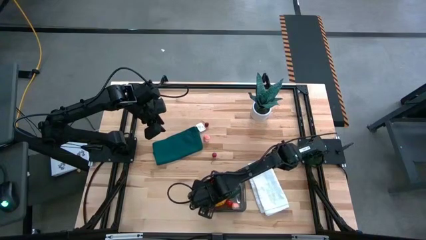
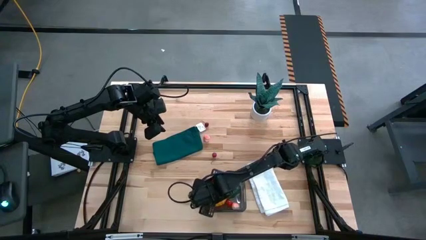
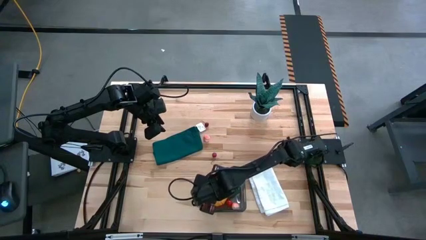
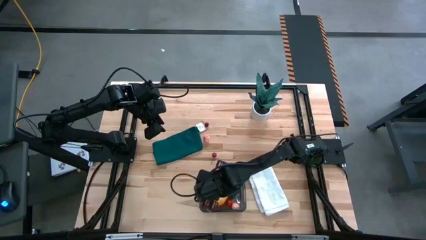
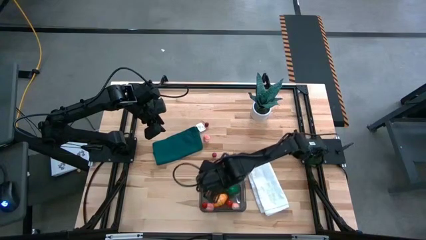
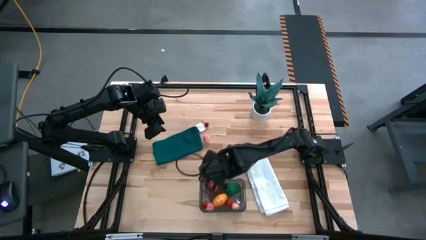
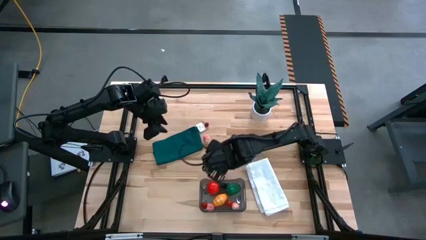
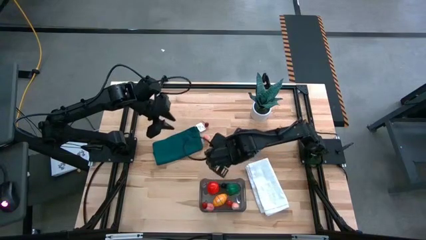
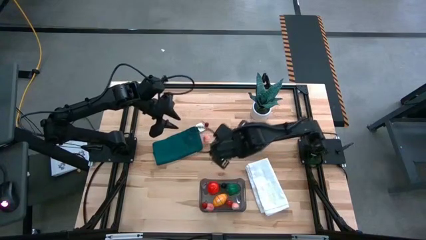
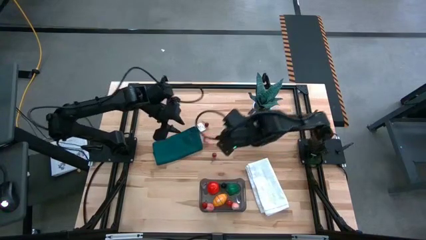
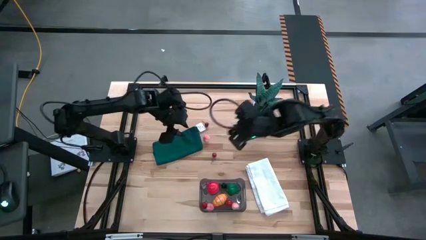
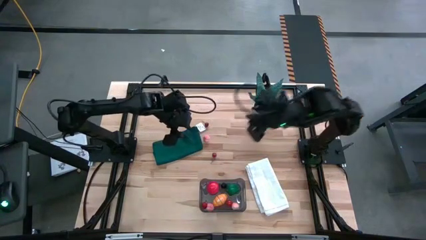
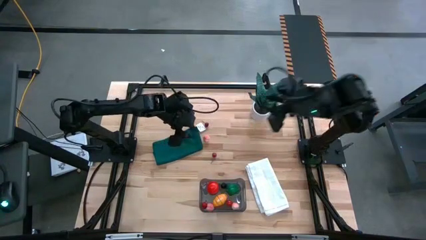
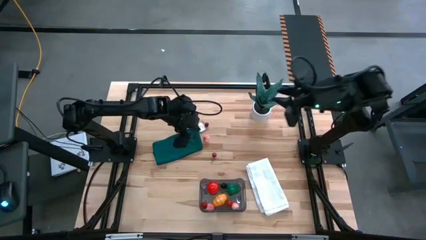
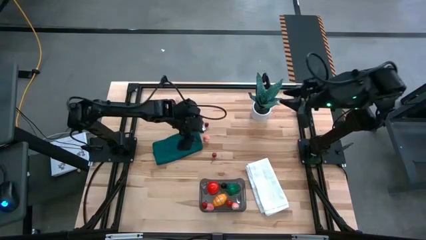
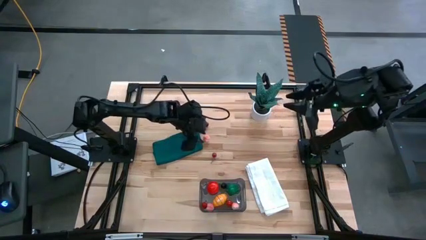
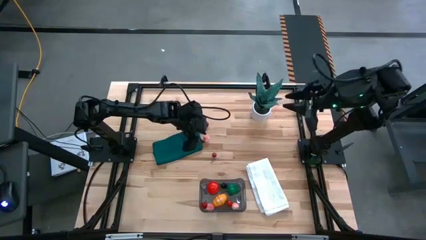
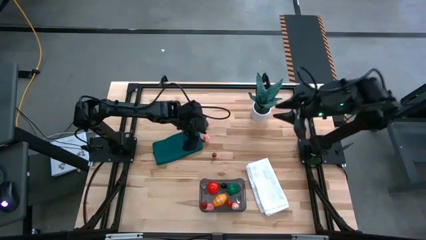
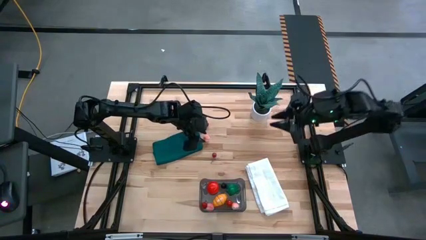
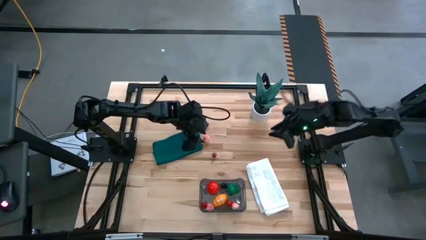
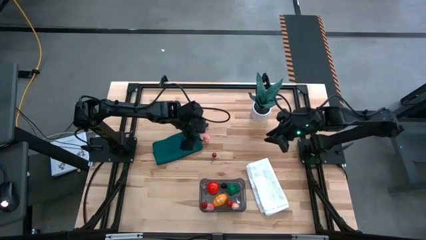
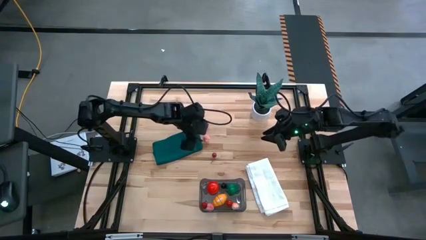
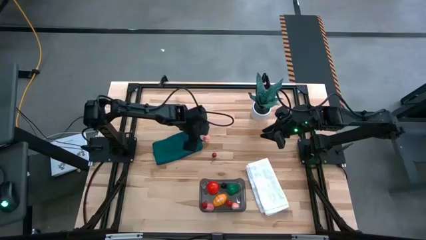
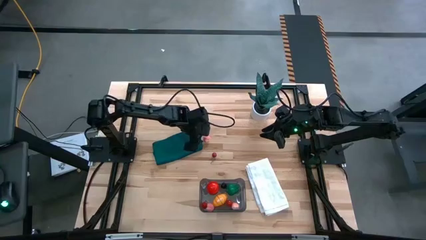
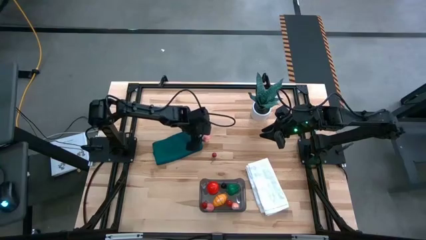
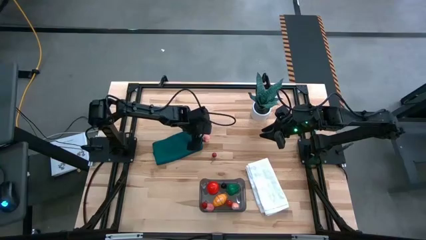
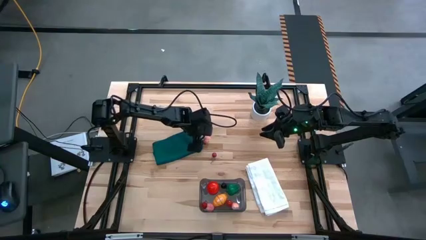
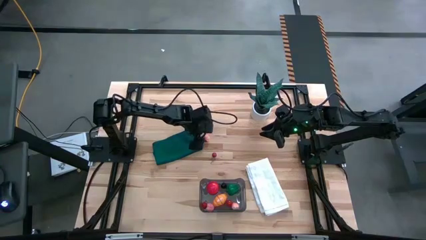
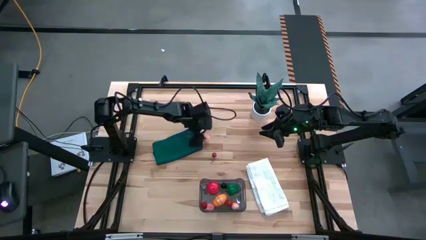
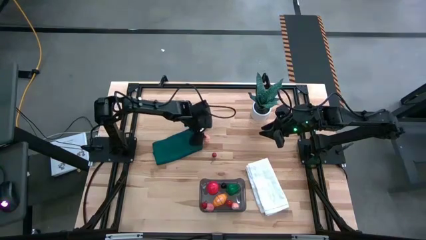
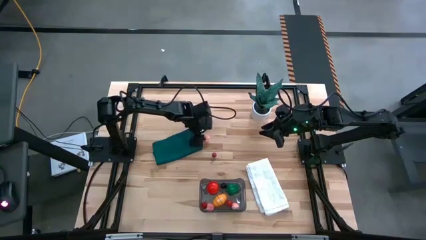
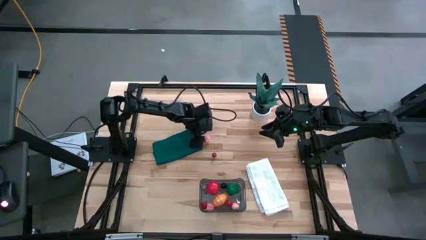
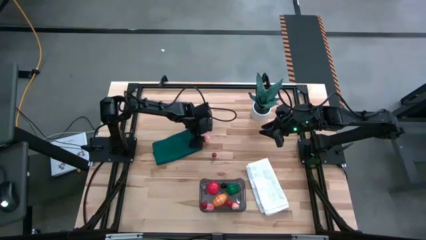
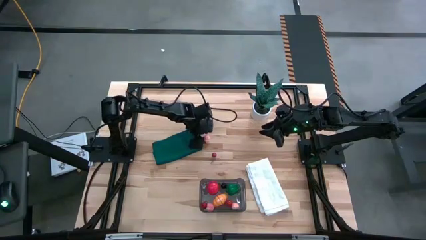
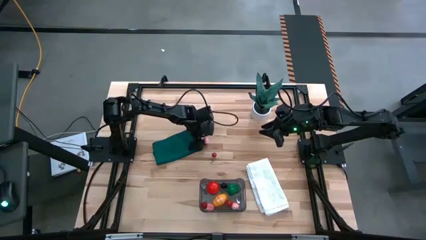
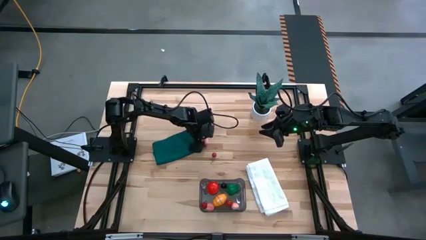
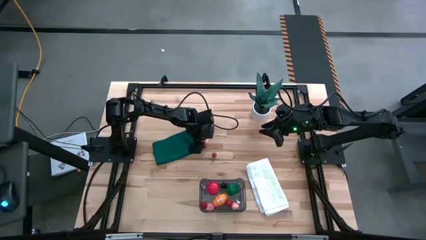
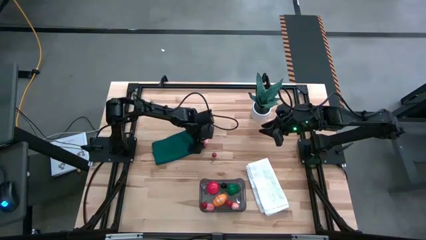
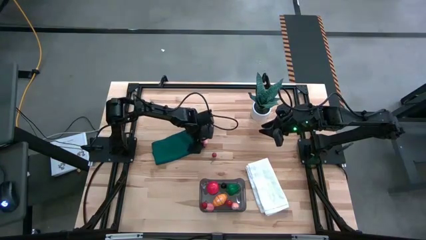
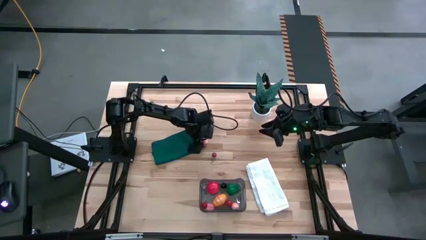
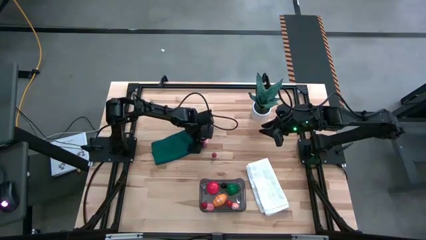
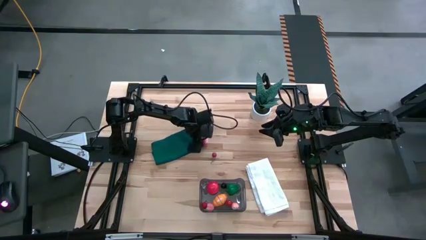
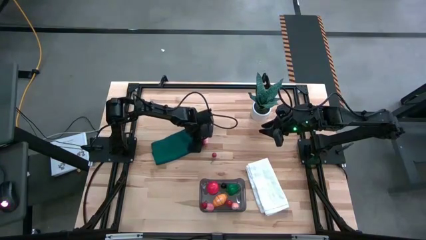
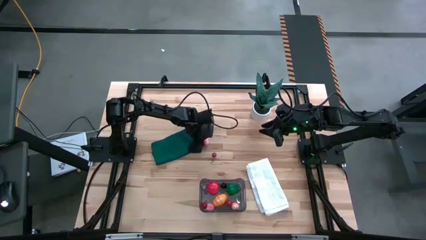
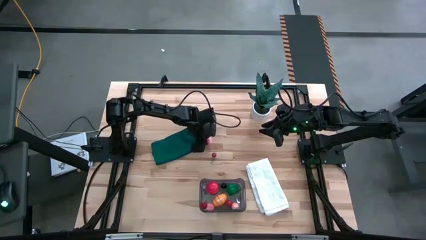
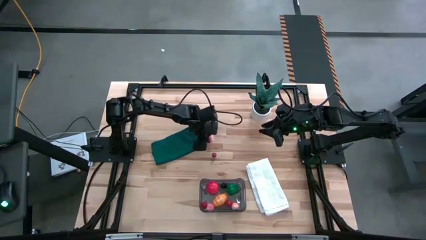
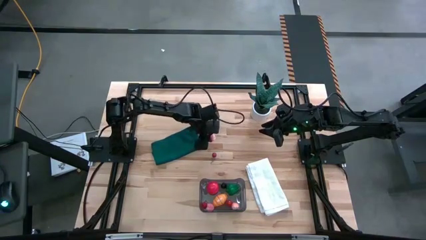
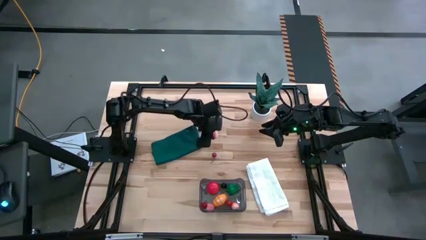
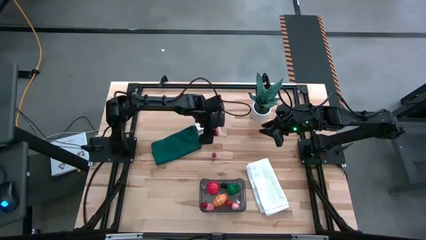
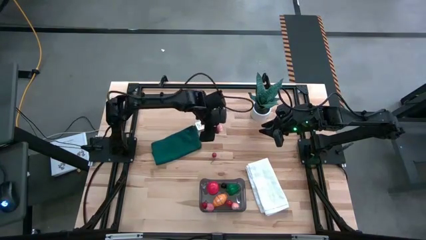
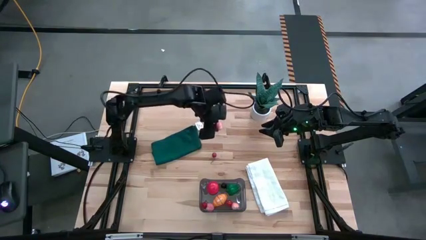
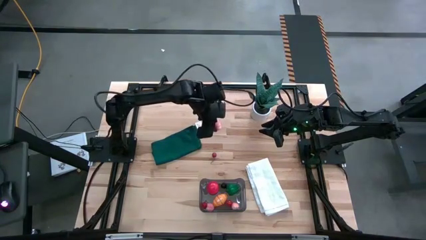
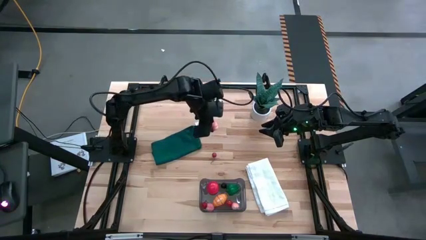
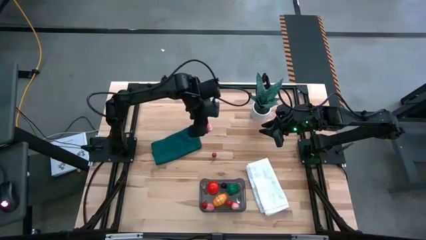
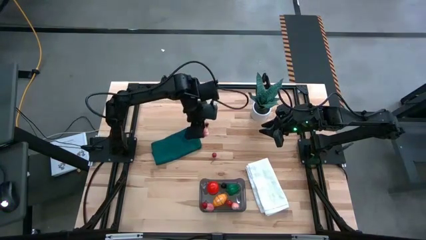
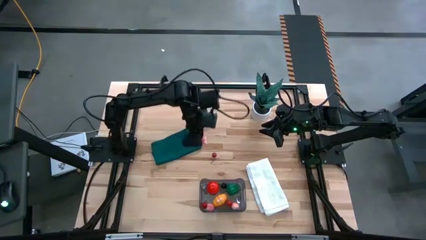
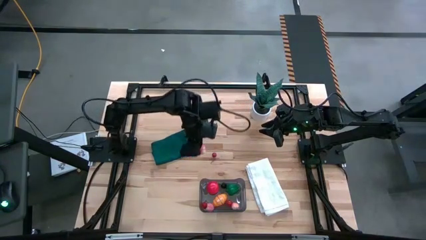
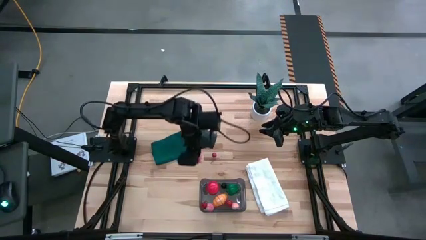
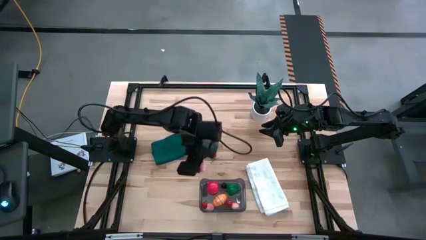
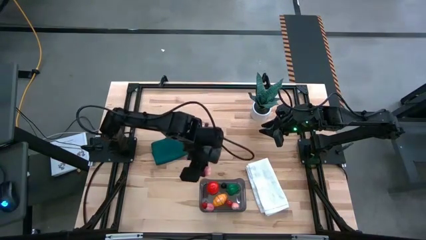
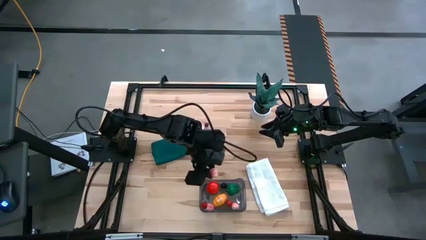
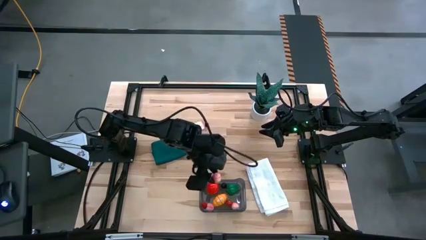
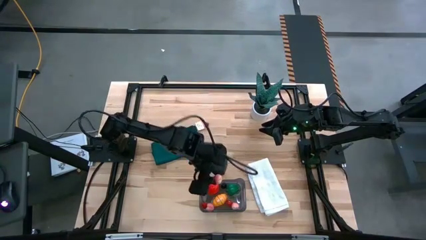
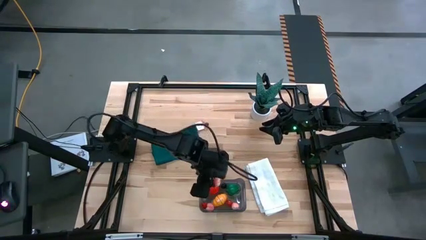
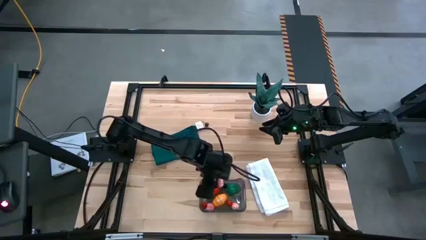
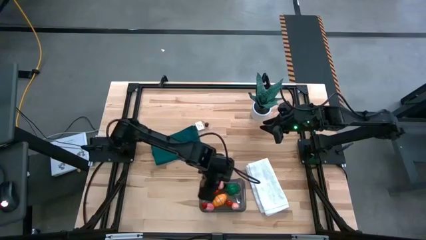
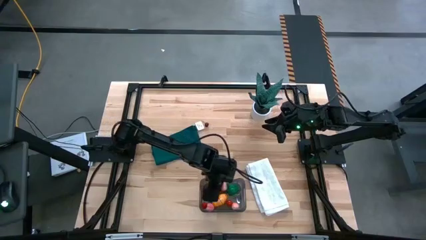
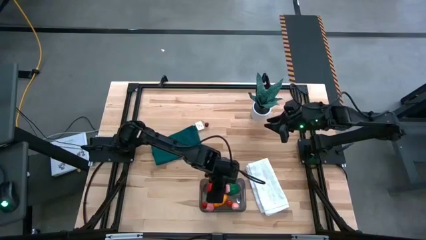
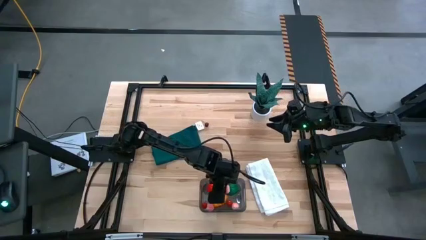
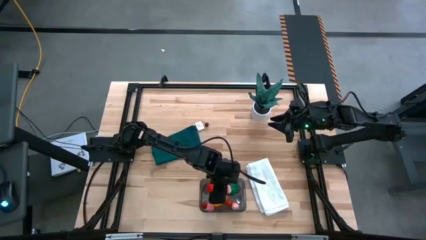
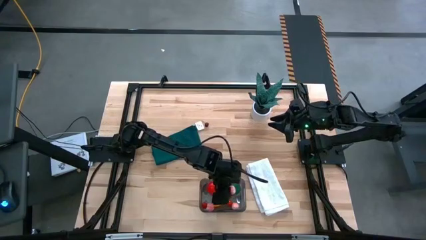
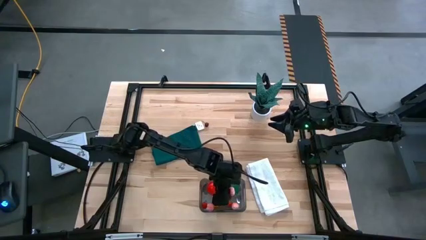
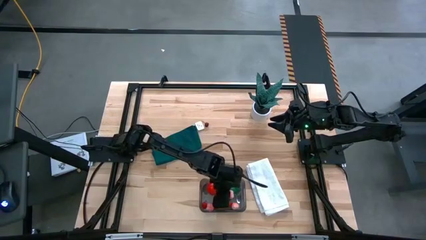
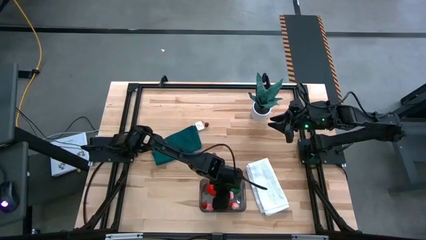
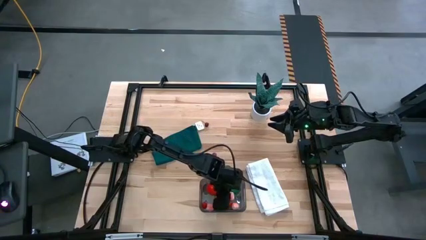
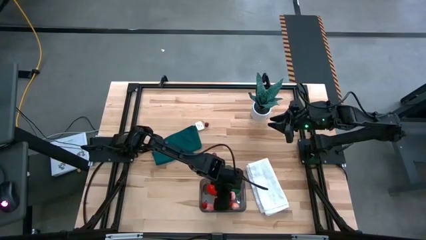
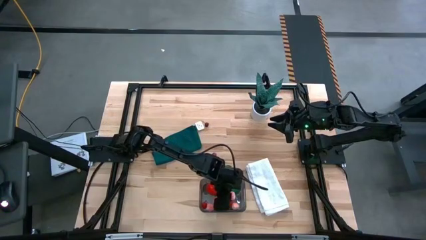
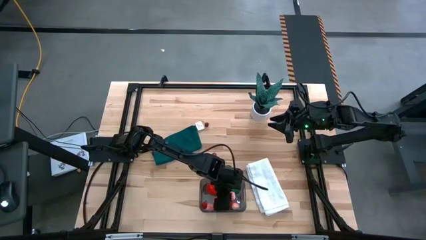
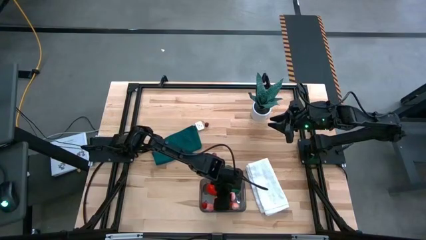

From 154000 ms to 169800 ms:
Task: Pick and placing Produce into tupperware
Put the pink peach into the black bin
